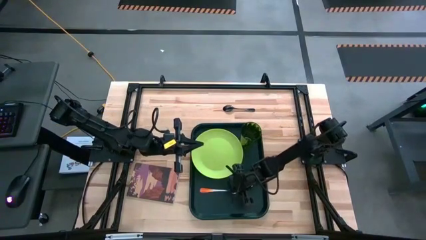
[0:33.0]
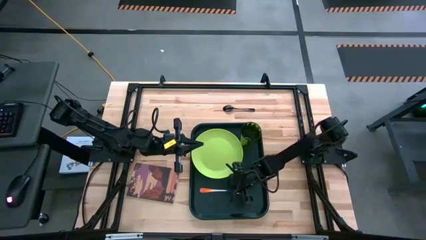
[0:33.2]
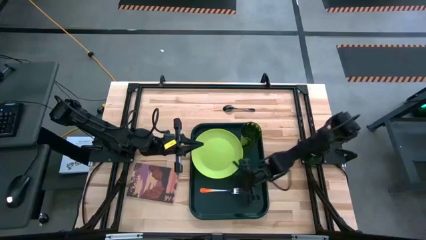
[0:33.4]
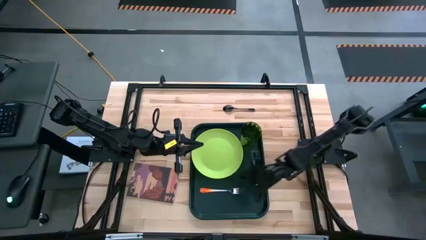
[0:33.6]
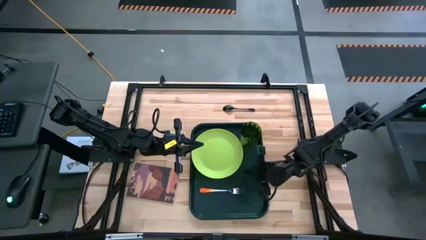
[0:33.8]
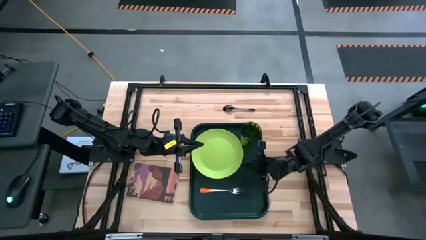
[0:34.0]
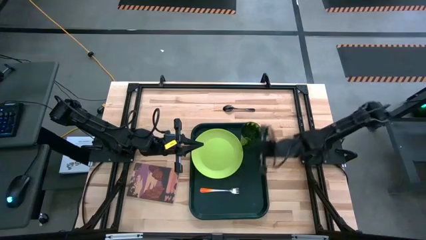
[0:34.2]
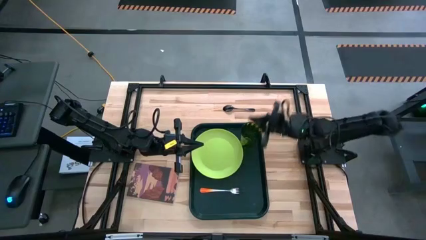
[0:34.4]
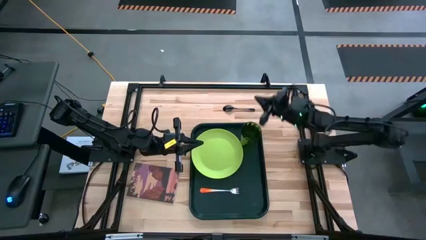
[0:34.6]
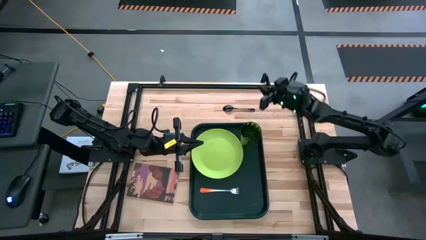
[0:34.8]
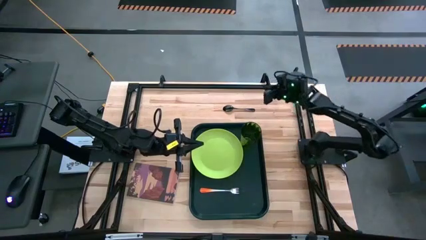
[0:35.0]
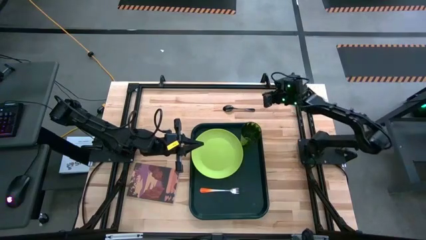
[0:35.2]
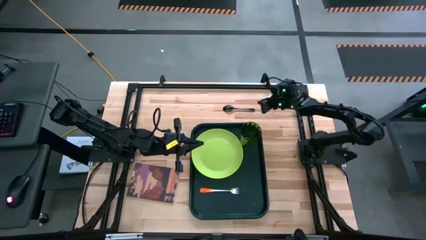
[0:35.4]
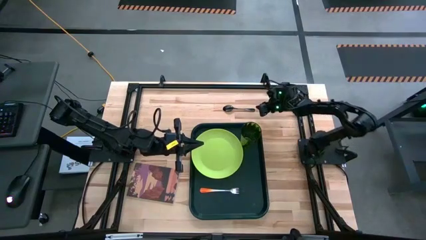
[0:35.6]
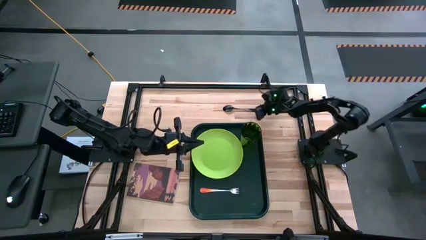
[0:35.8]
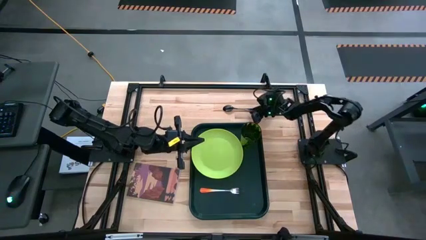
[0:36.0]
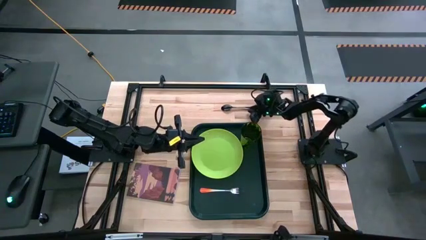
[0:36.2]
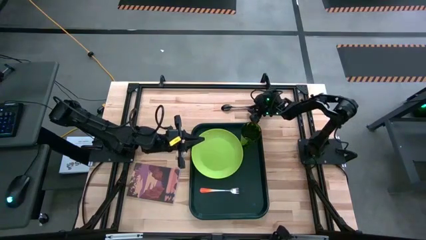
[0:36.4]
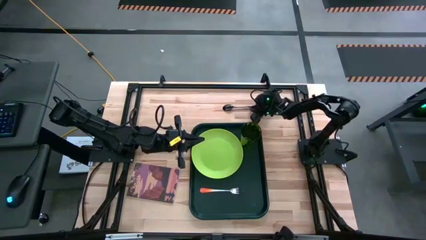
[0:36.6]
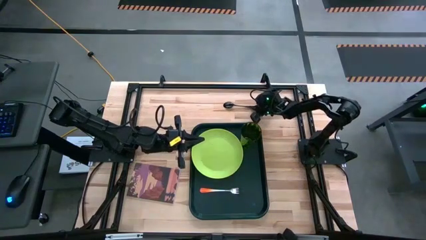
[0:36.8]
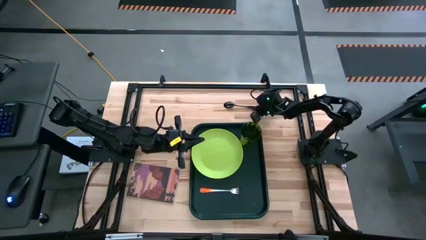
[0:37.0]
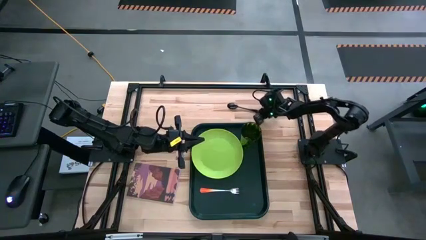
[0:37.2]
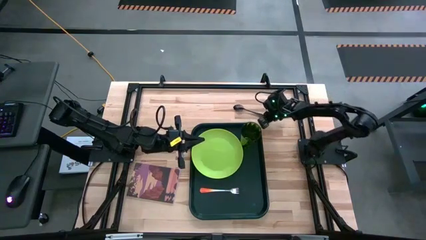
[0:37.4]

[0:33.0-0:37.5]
Task: Pick and place plate/cup/fork/spoon on tray
Put the black spoon on the black serving tray in between the green plate and orange fork

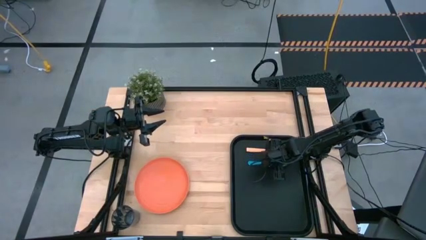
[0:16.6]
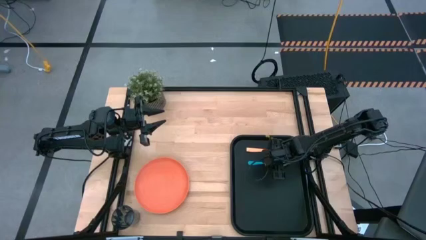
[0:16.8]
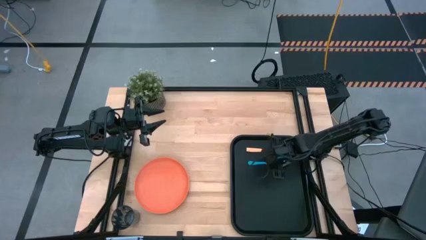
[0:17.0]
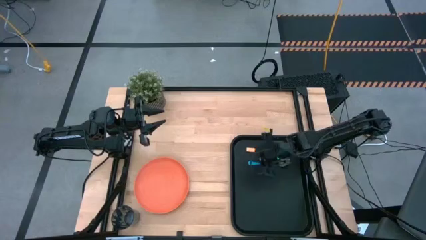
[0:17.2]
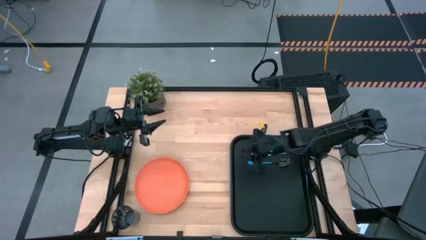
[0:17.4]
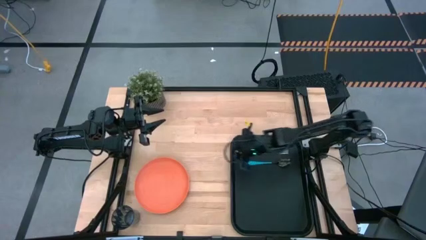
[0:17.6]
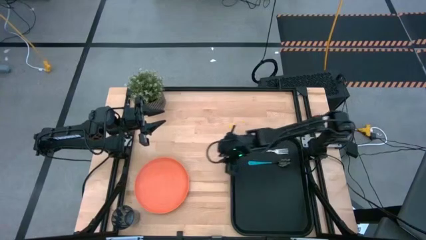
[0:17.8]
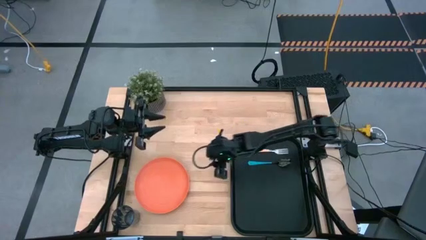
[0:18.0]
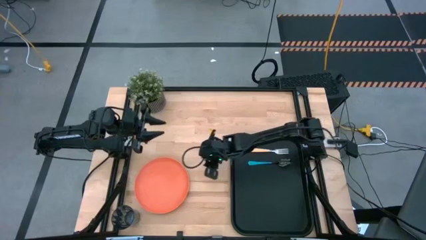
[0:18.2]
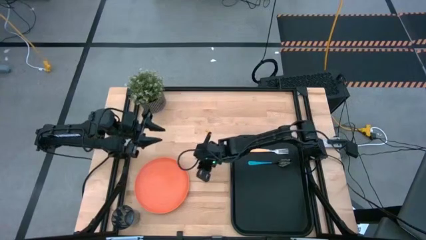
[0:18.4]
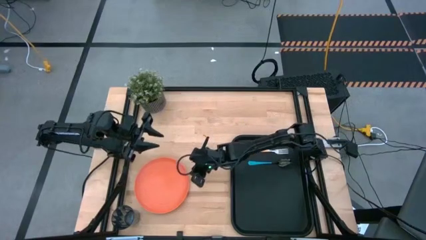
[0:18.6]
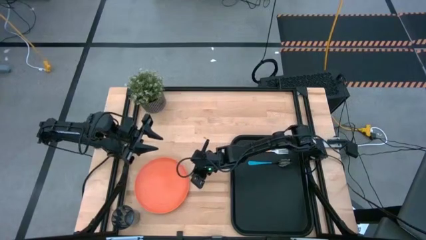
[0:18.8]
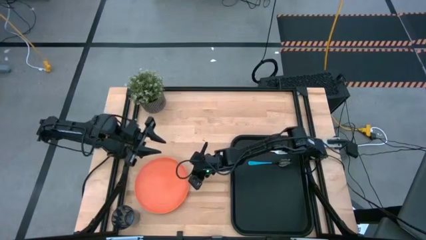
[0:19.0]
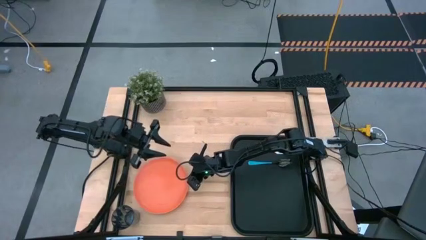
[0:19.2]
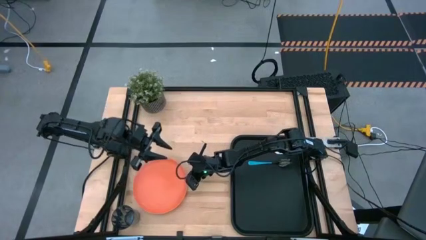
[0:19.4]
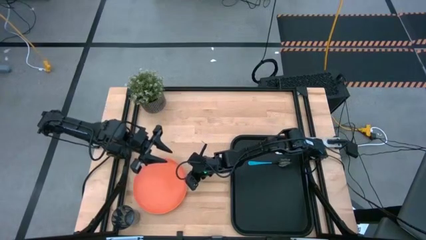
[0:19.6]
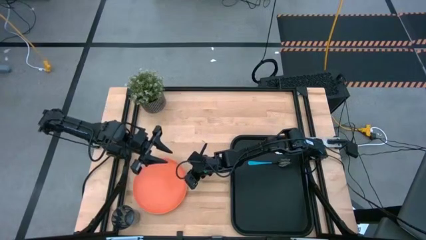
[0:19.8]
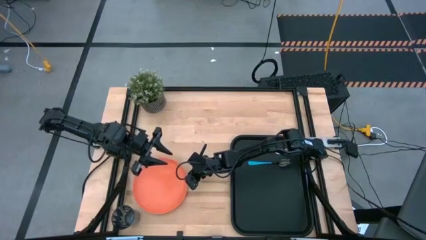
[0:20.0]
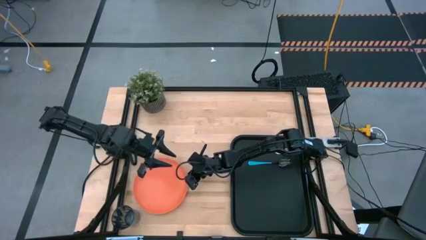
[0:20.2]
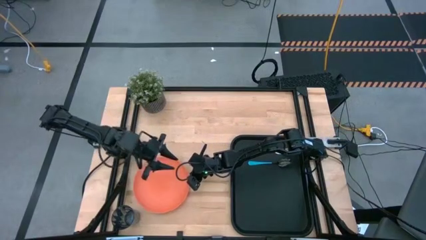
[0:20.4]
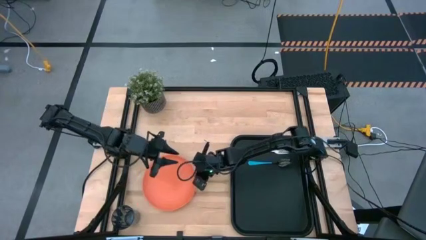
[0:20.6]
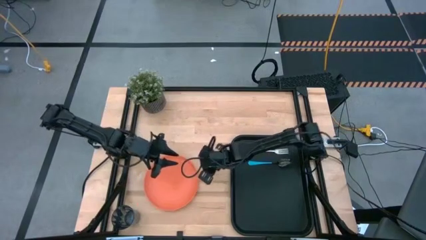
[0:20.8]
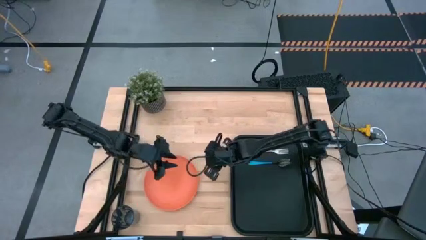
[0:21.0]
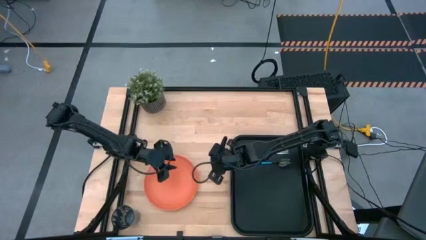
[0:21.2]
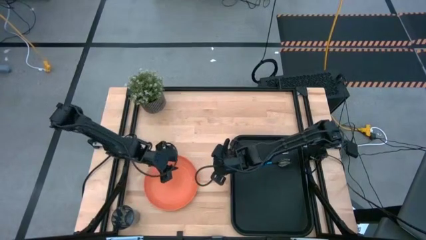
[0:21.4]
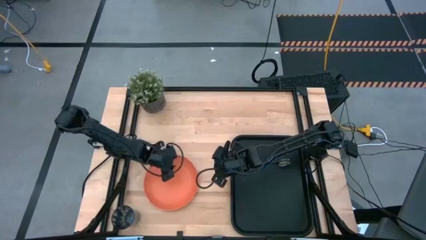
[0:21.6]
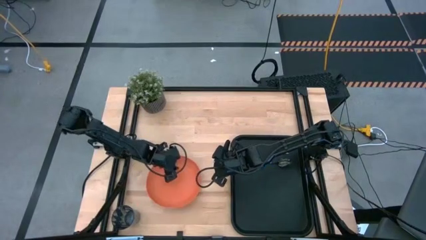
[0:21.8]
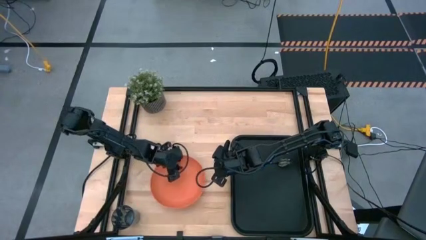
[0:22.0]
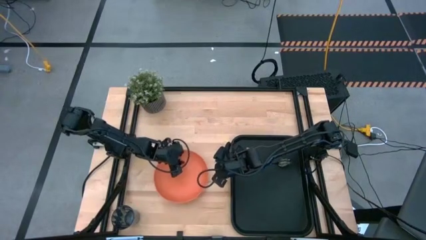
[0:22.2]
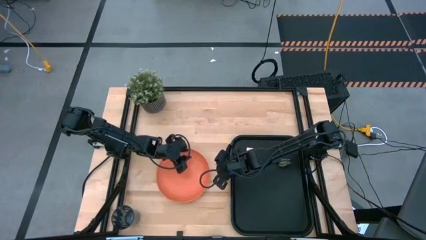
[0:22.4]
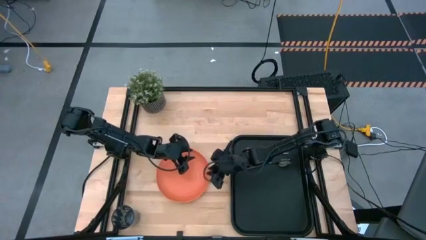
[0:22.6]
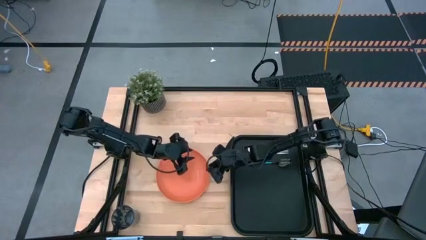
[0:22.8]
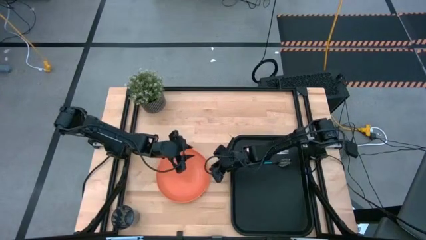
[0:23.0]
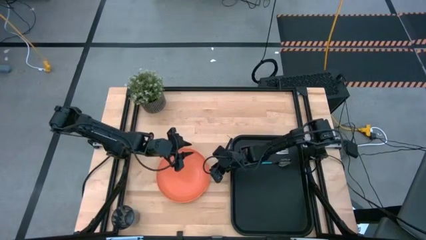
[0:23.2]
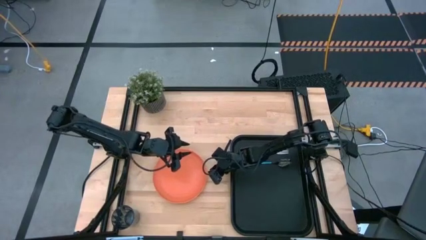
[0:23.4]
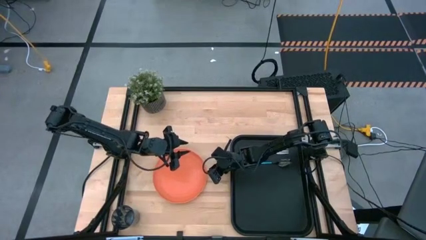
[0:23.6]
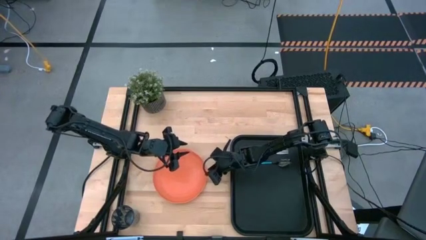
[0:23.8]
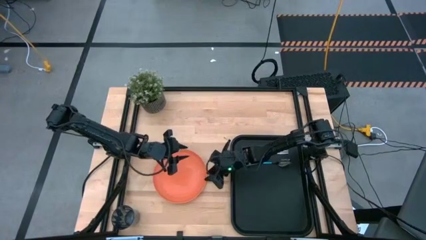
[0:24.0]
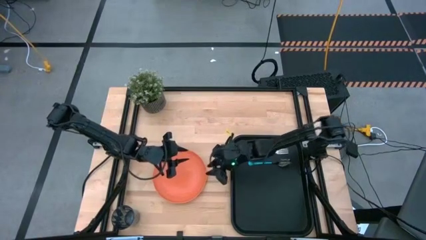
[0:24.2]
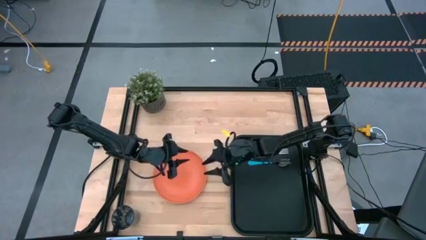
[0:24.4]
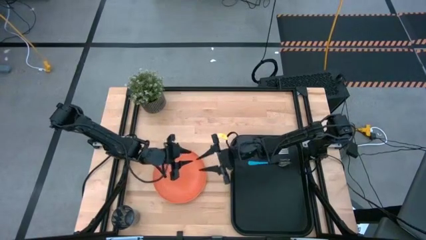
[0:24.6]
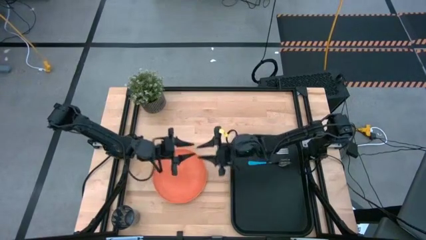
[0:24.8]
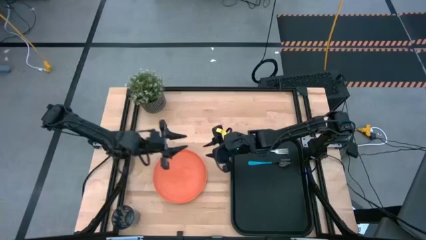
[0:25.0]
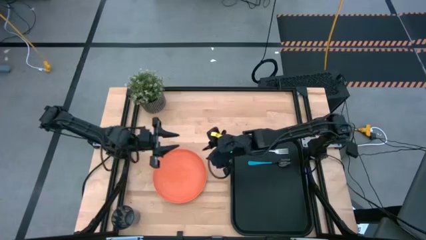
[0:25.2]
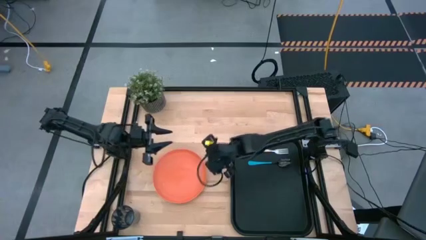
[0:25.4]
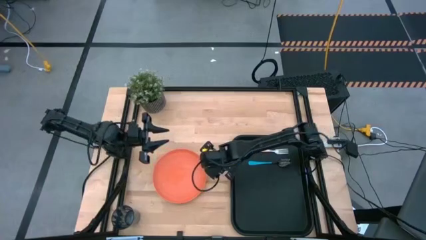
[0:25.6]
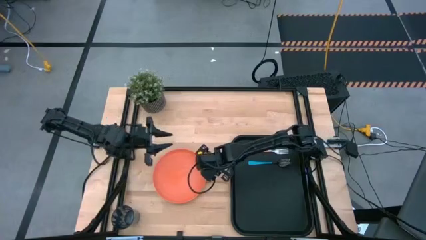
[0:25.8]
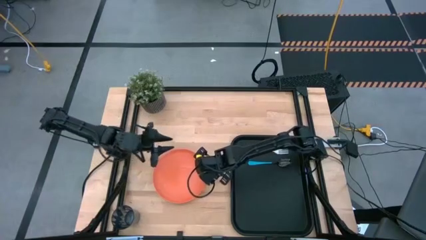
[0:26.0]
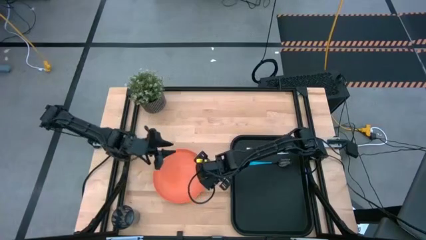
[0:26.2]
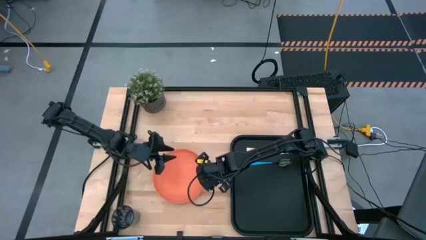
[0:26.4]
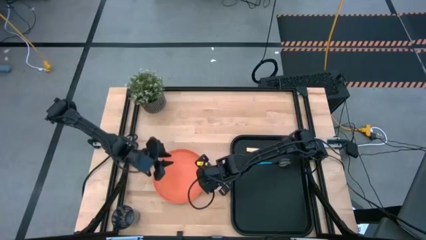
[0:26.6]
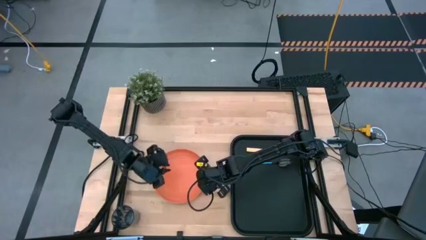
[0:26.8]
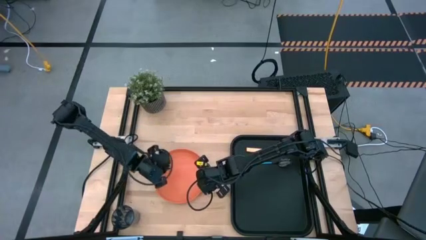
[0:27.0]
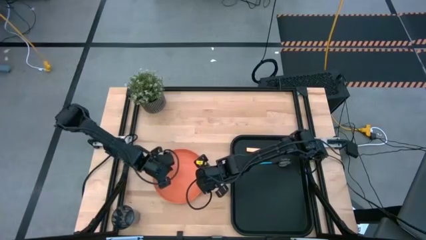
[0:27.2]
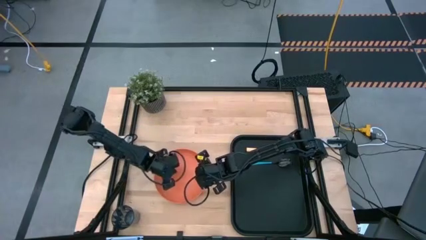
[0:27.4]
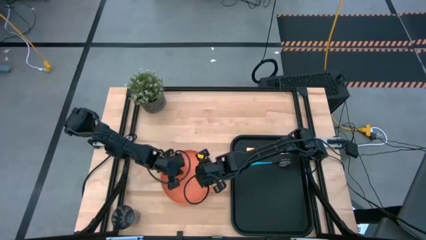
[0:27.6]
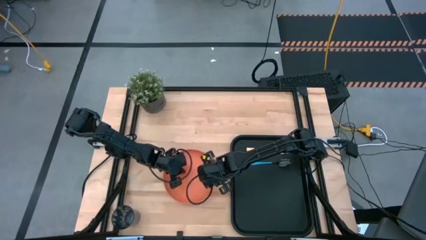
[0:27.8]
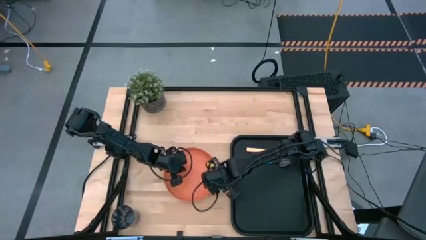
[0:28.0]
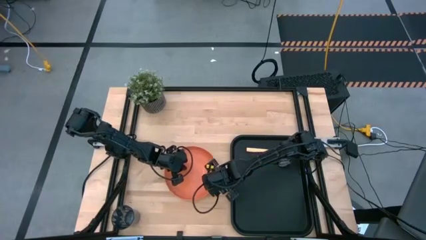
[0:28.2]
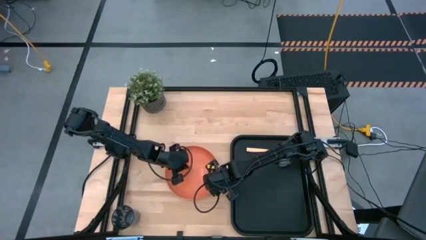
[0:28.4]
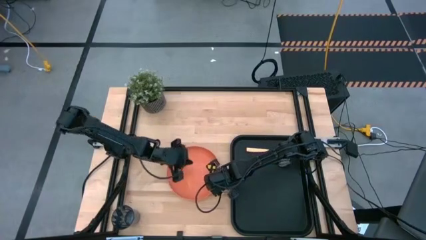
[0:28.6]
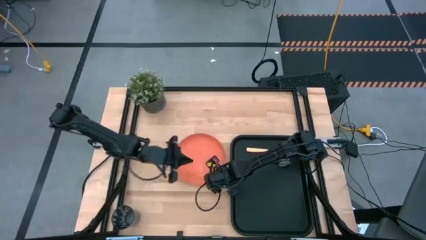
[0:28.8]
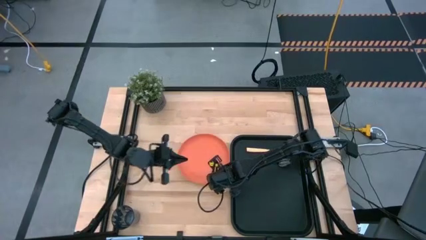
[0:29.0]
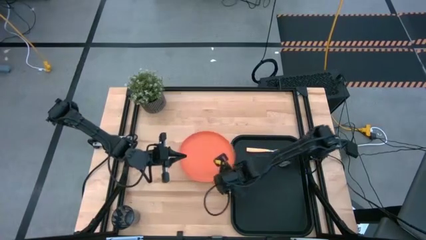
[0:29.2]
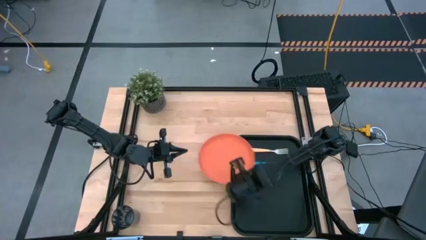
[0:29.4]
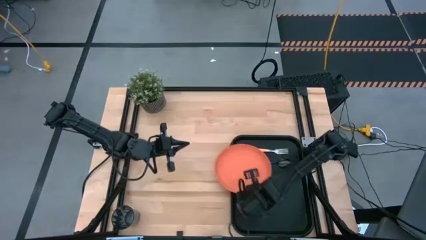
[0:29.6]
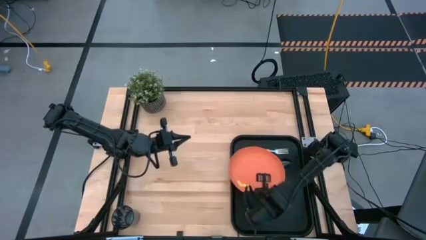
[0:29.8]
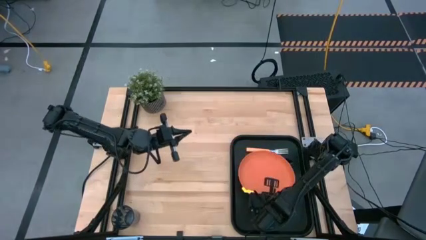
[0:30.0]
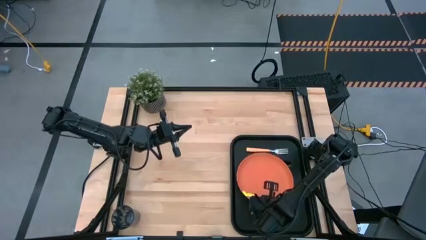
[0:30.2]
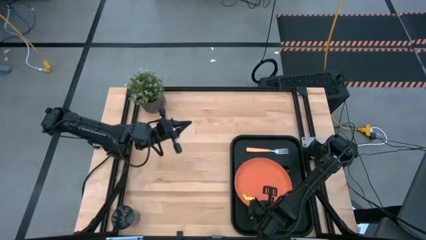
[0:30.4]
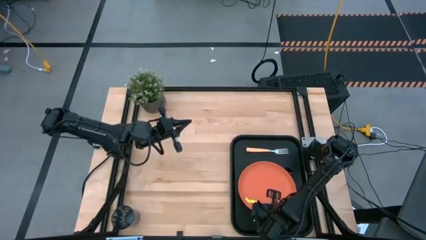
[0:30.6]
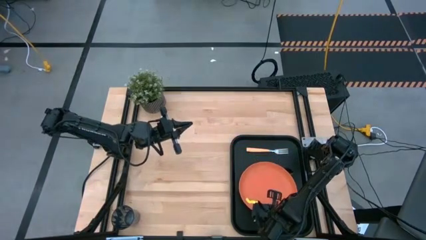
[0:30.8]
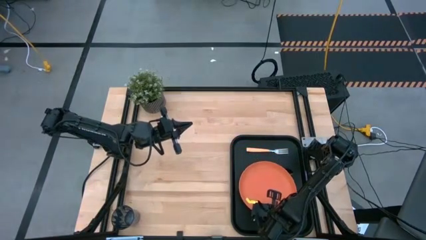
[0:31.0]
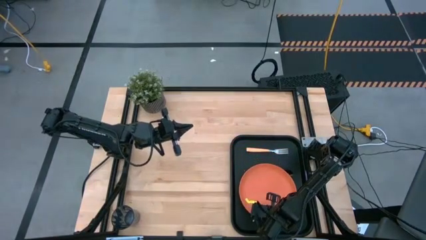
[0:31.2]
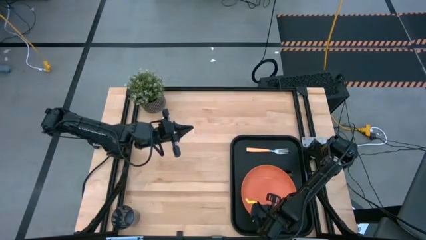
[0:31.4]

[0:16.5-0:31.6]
Task: Pick and place plate/cup/fork/spoon on tray
Put the orange plate to the bottom of blue spoon on the black table tray
